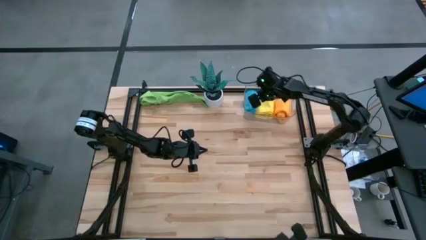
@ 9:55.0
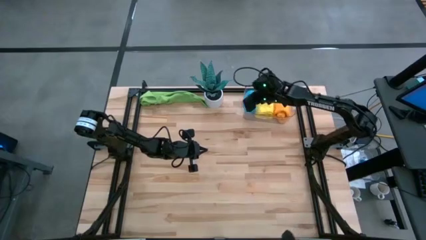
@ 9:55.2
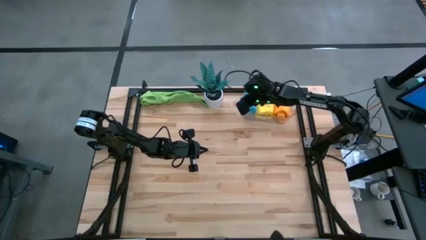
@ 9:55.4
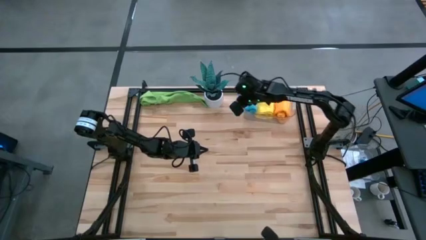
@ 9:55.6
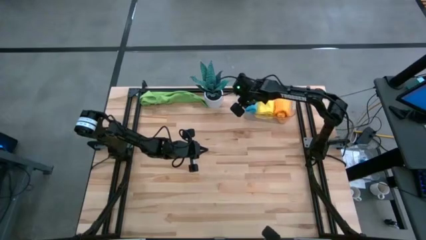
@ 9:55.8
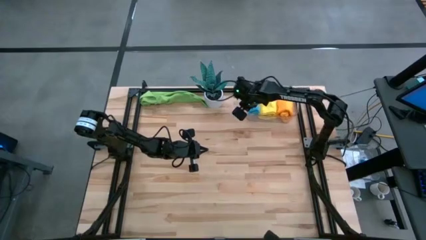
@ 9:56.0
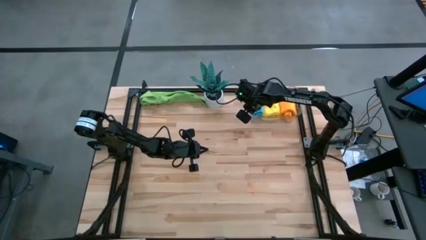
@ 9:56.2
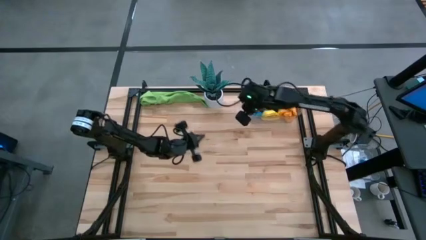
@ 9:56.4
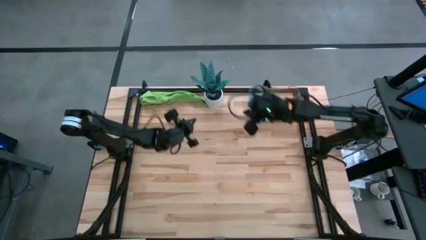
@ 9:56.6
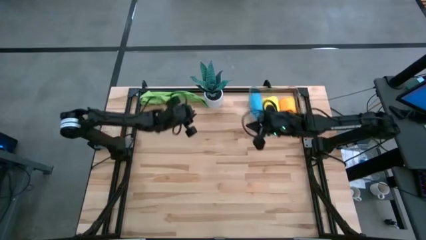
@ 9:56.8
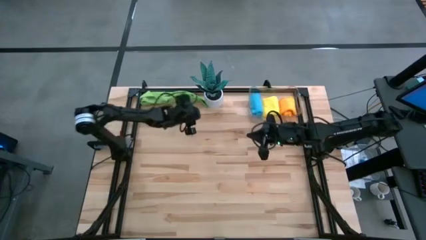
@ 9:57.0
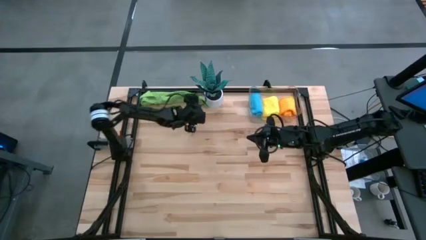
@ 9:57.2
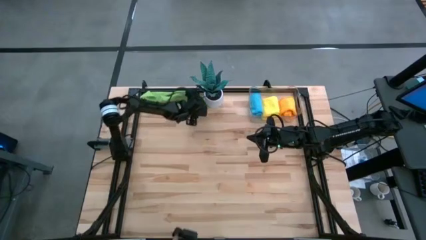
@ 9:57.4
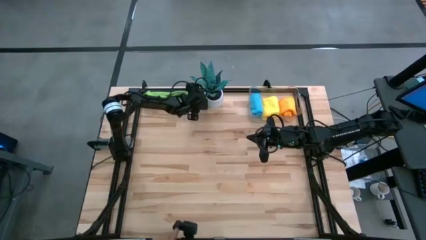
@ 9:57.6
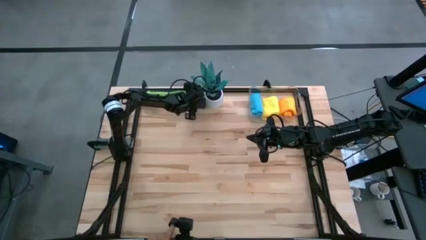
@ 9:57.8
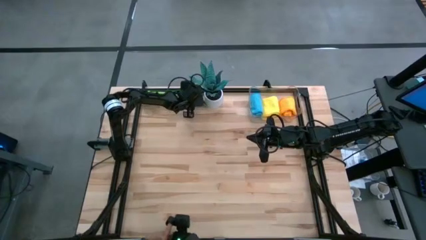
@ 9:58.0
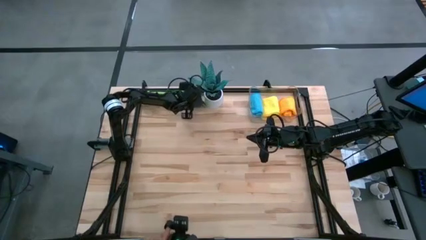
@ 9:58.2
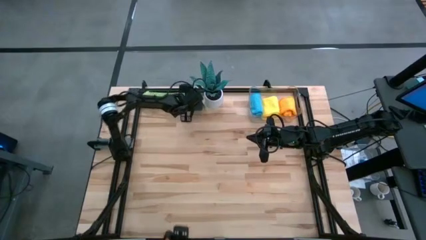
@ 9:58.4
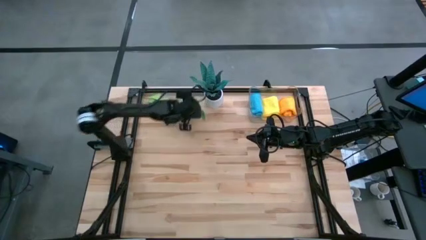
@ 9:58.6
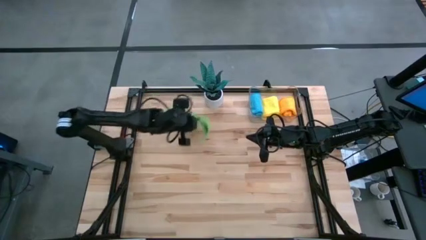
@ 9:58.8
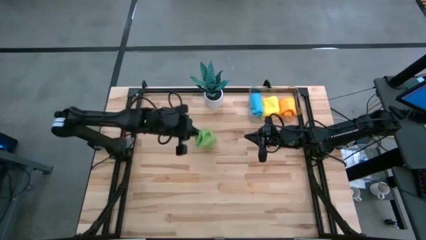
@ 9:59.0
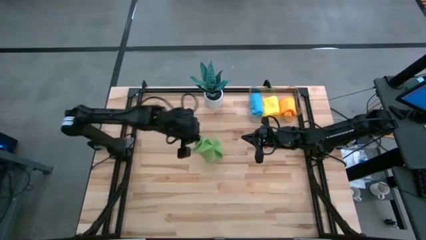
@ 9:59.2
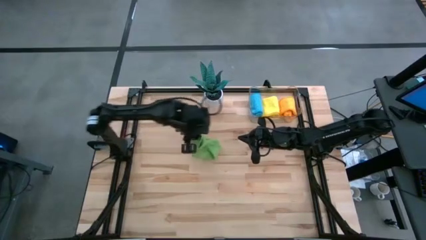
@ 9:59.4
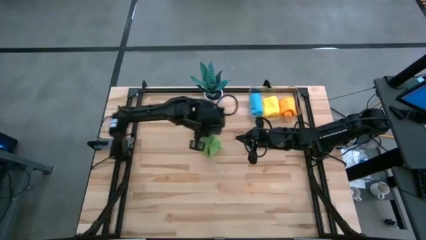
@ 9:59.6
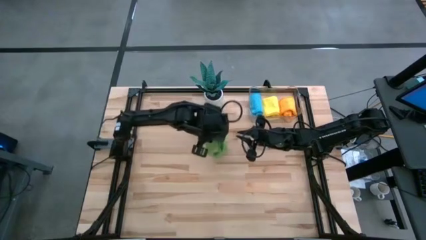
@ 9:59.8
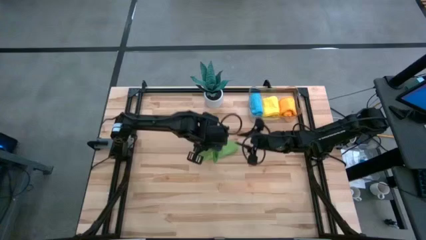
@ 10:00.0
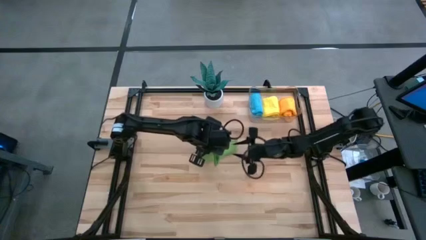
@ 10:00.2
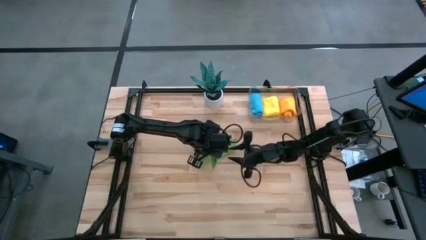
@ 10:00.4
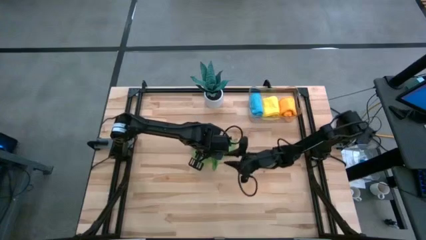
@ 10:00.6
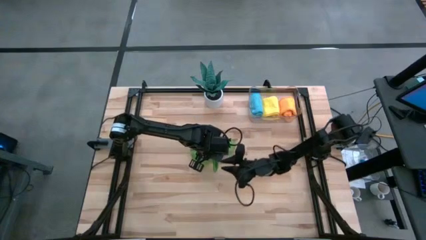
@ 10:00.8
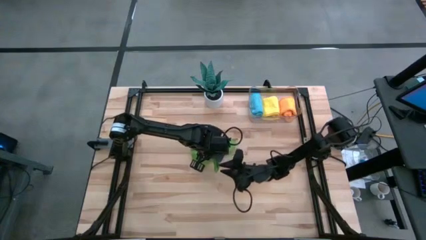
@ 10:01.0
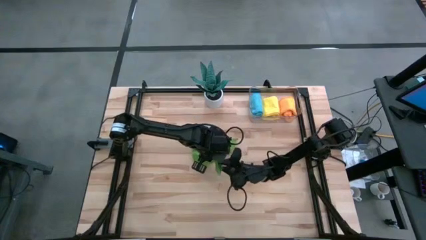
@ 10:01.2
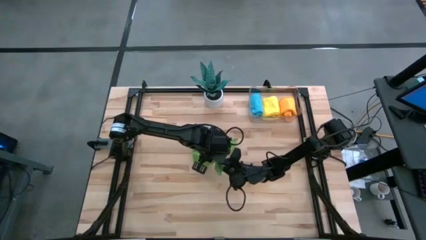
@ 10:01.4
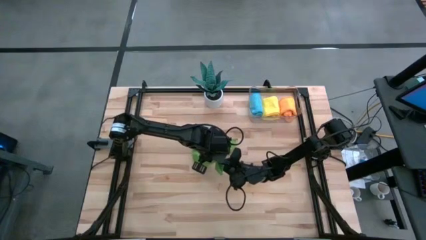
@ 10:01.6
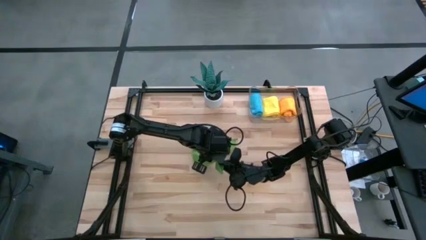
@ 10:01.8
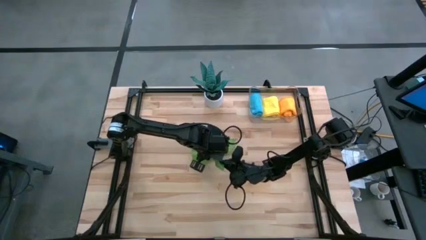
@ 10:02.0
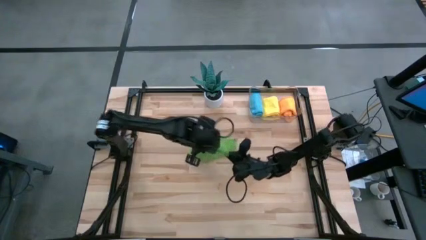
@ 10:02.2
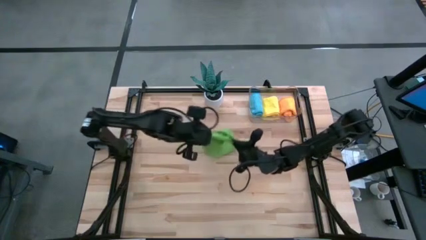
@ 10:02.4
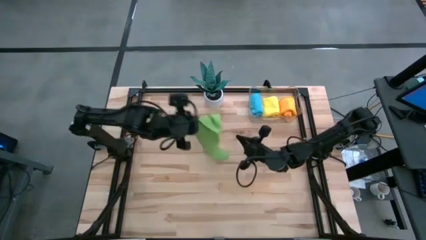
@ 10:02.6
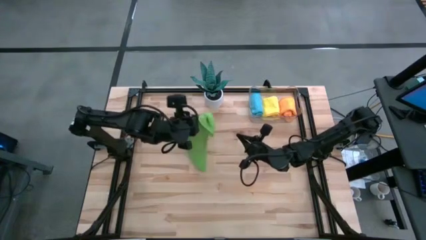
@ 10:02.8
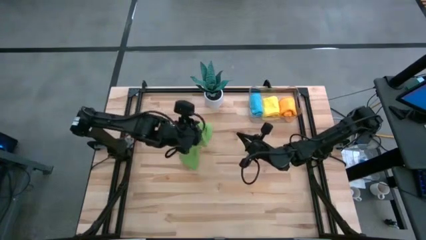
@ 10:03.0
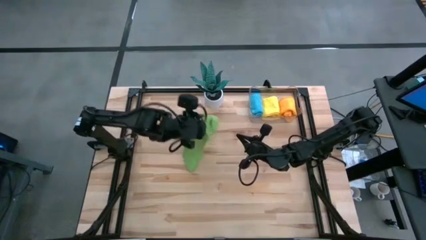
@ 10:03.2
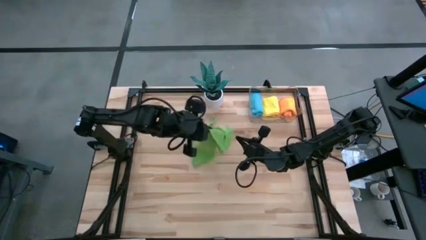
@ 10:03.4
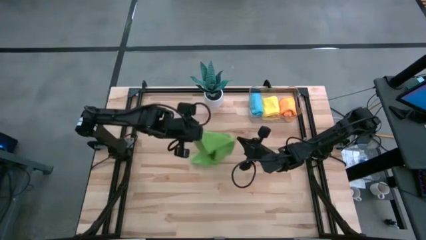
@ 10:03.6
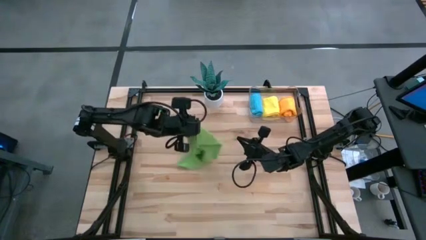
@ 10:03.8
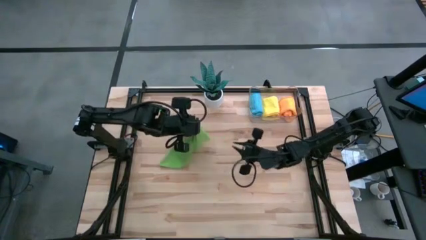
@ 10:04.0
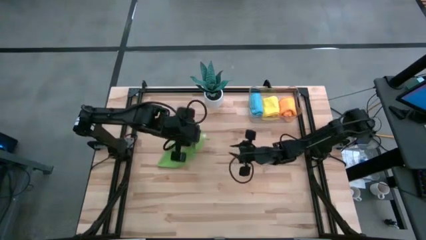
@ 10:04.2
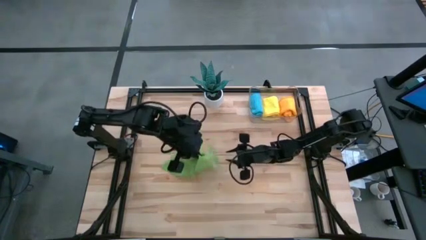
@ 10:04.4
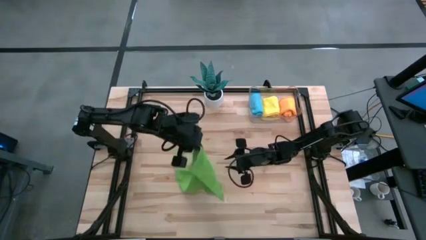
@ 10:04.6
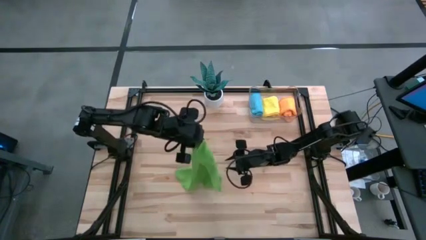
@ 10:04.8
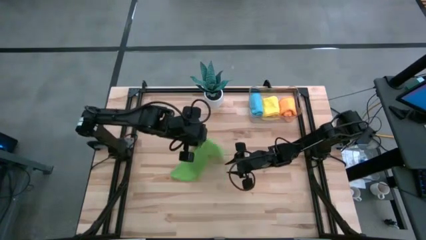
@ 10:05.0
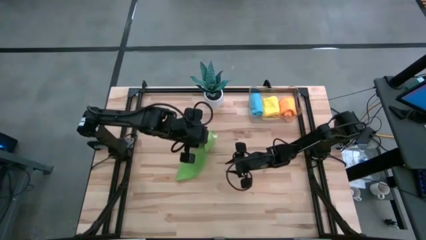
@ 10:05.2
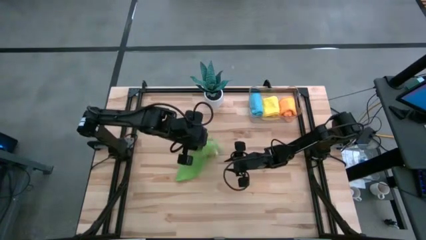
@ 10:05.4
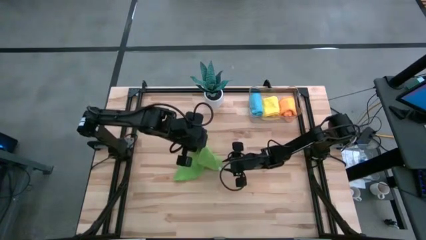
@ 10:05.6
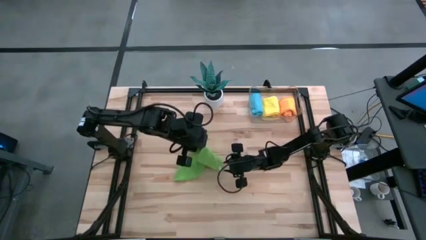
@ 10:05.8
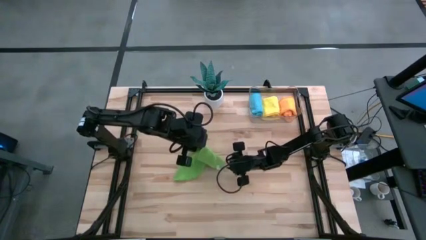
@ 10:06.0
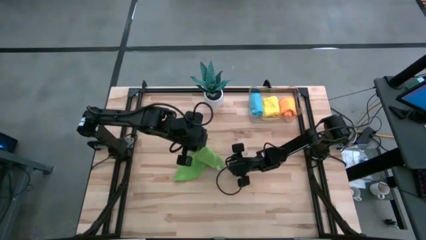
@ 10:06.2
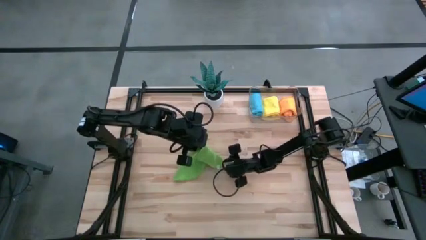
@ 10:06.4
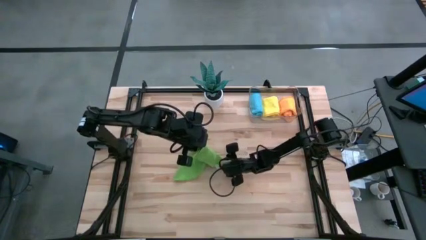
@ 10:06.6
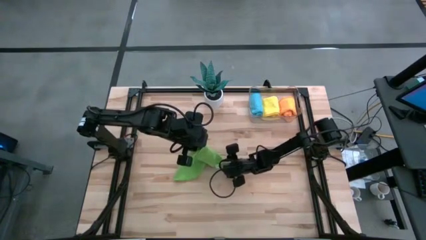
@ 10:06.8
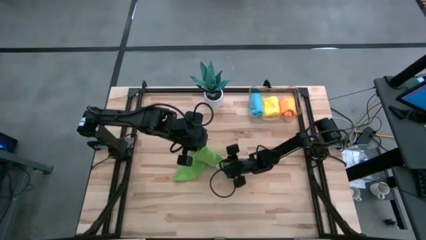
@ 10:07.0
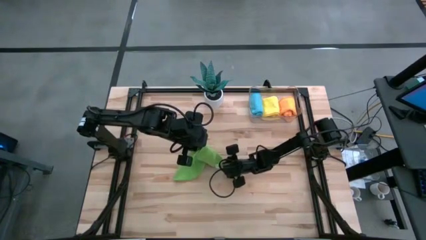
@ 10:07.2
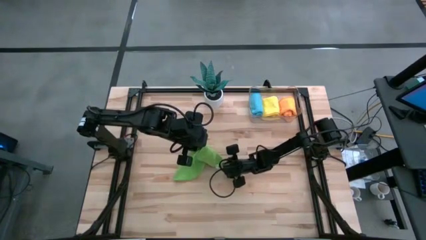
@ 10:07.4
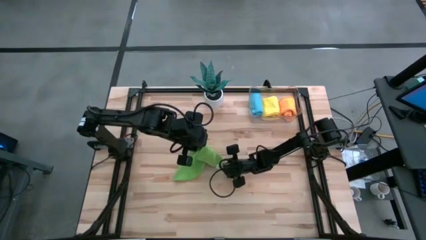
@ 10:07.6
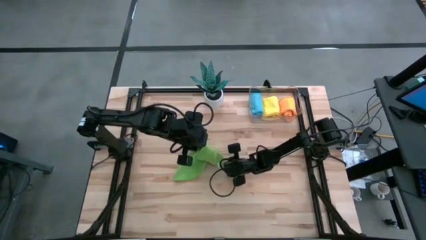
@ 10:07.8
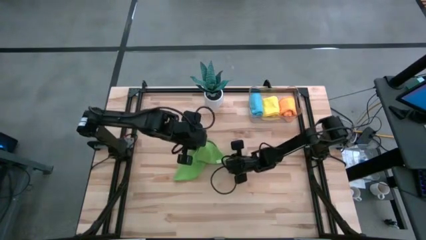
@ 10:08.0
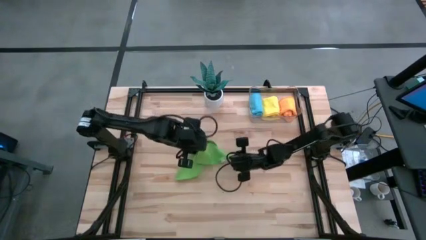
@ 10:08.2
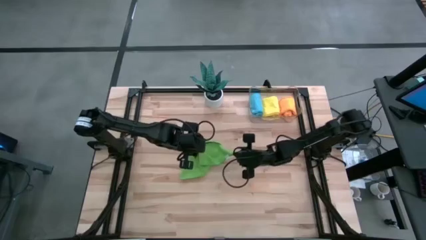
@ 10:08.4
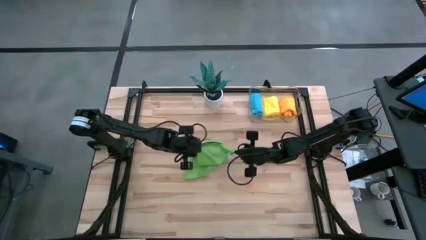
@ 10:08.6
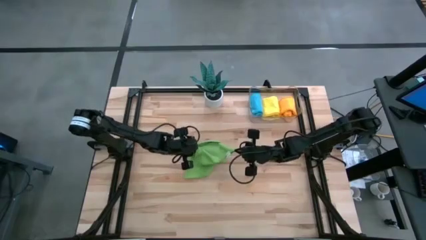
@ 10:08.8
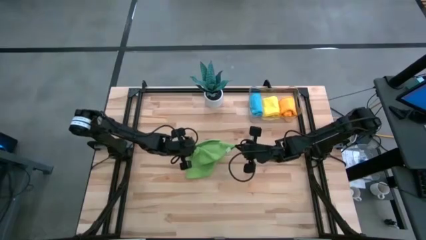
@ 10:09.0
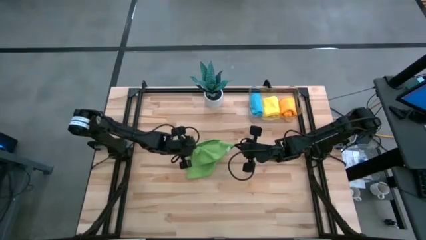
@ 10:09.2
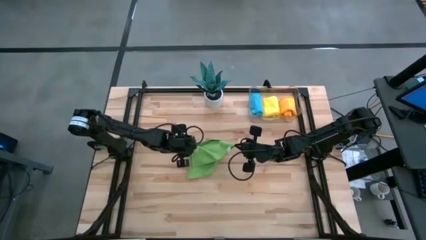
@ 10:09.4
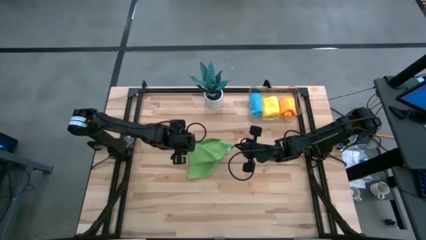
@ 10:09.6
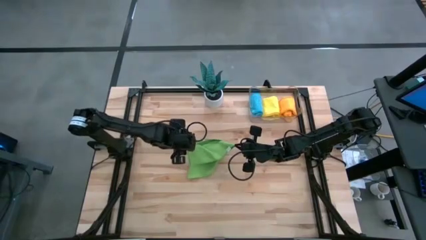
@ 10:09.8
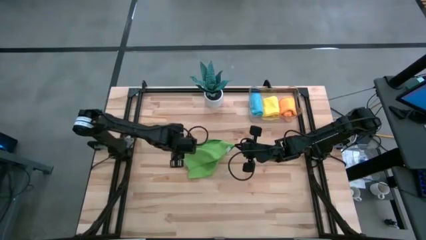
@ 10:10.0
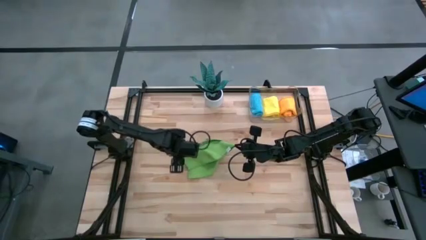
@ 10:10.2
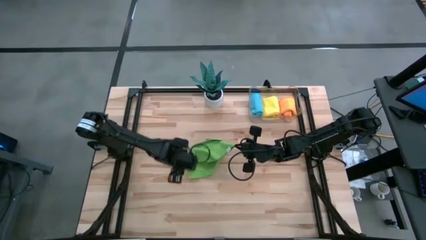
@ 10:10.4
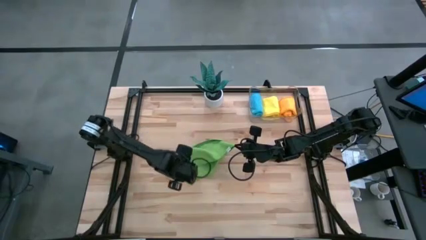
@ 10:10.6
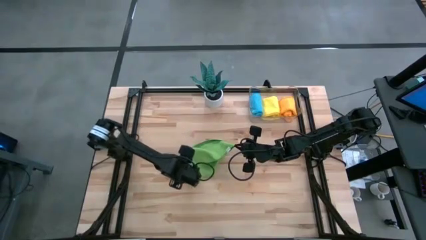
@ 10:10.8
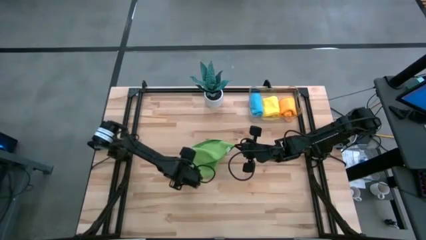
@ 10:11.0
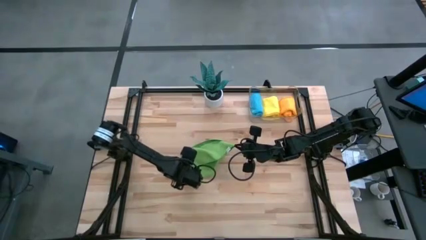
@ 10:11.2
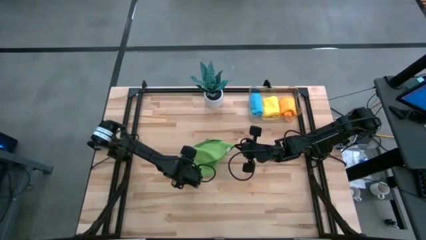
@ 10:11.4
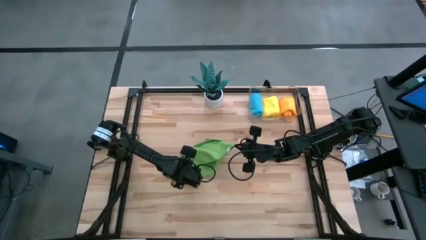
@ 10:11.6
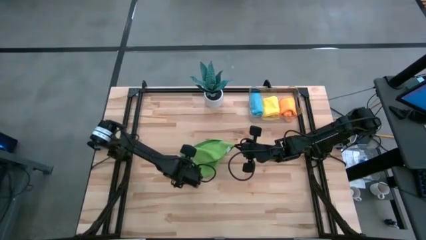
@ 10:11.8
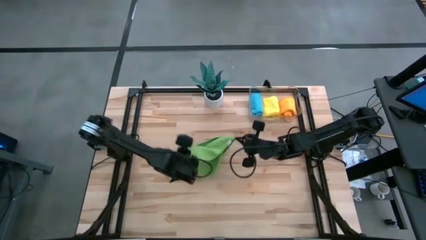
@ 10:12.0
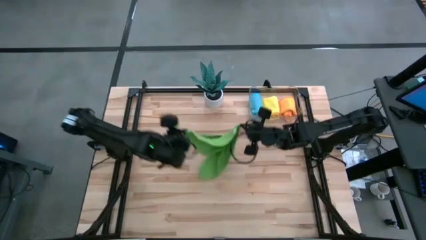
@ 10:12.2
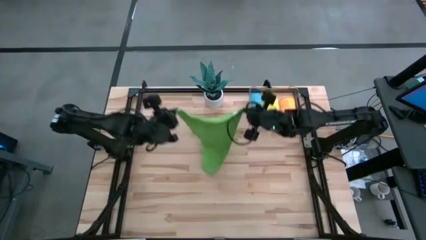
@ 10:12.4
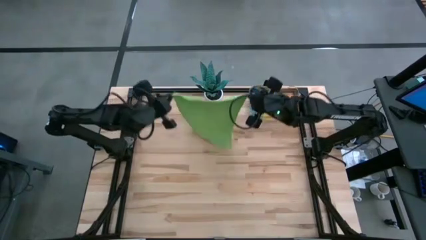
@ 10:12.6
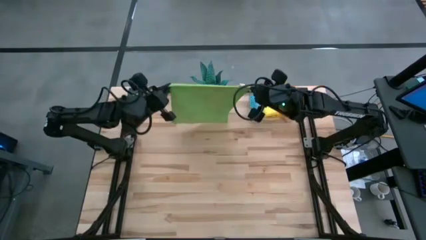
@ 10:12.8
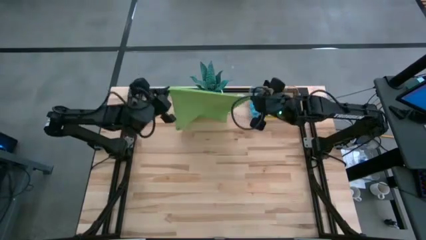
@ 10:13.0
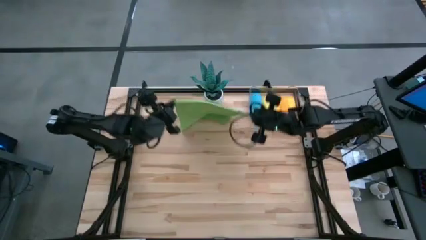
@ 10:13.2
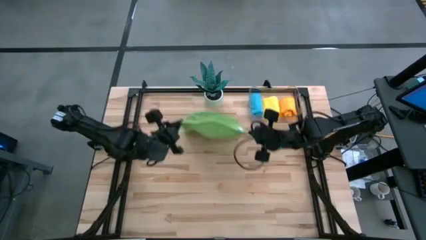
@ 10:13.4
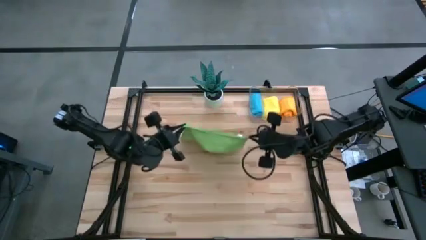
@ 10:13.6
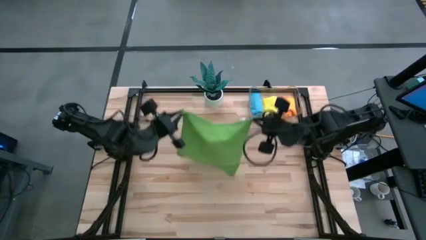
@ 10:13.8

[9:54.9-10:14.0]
Task: Roll microfiber towels into tight, uniform cylinder then place into a basket
Fold the green microfiber cloth
